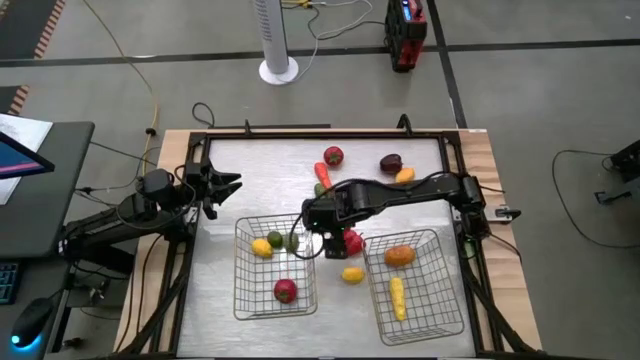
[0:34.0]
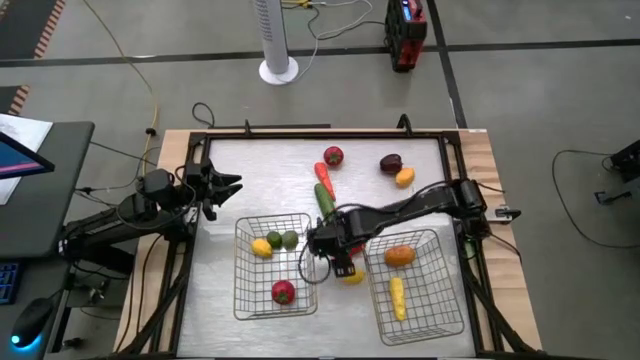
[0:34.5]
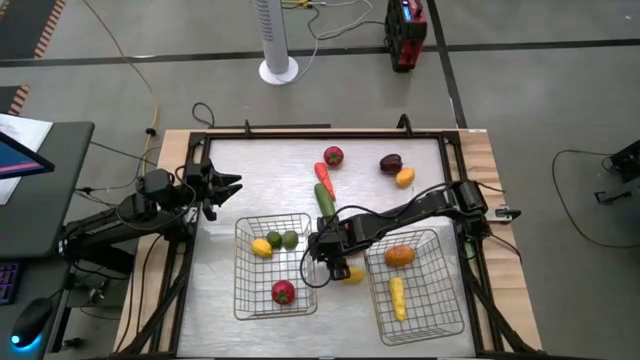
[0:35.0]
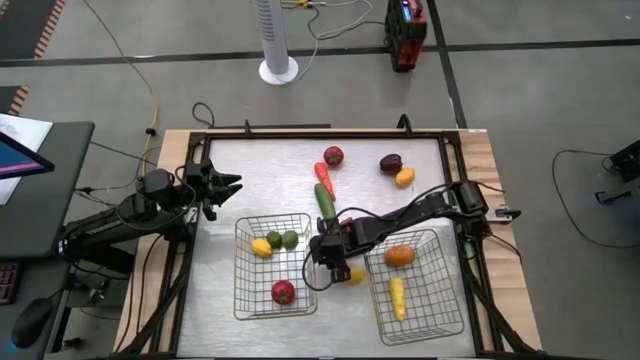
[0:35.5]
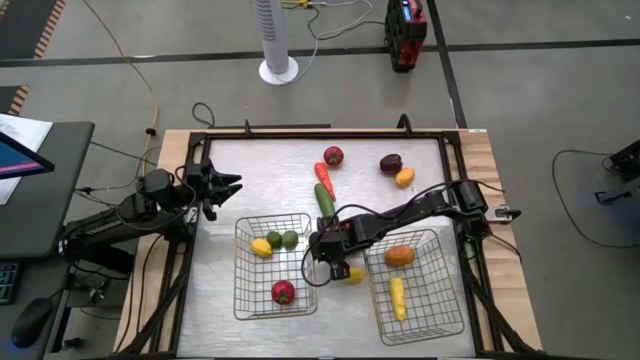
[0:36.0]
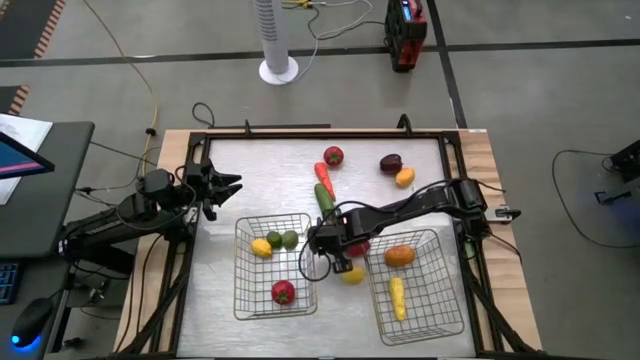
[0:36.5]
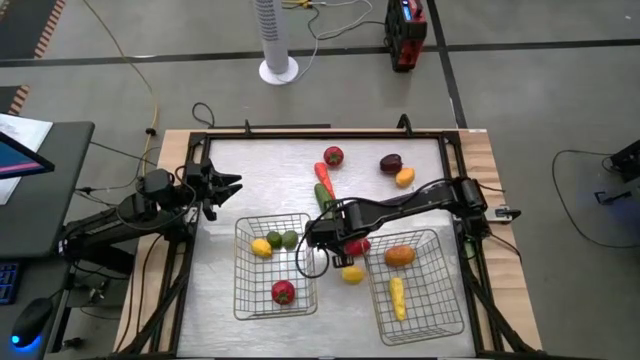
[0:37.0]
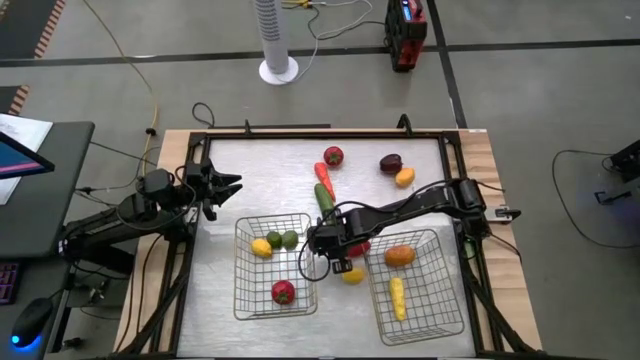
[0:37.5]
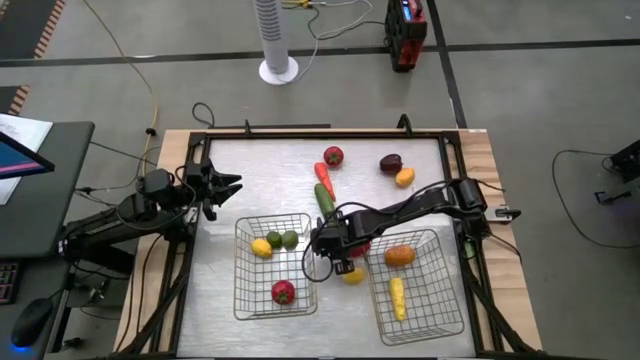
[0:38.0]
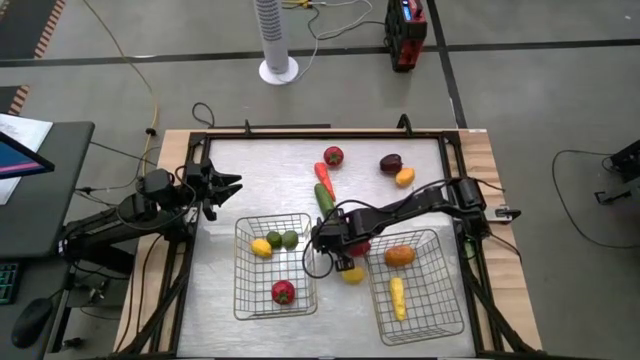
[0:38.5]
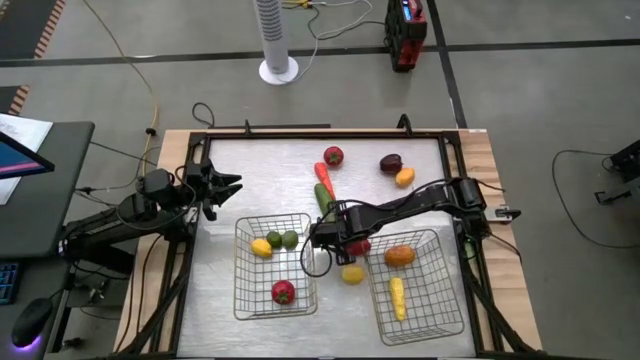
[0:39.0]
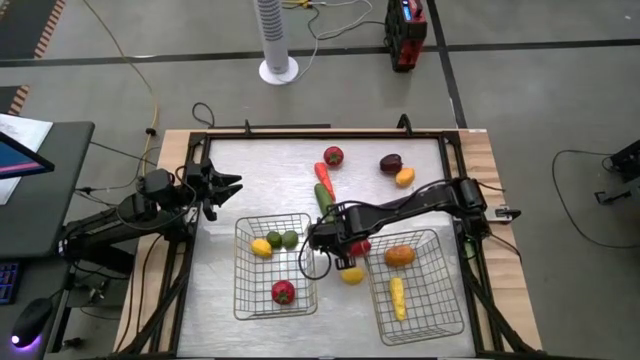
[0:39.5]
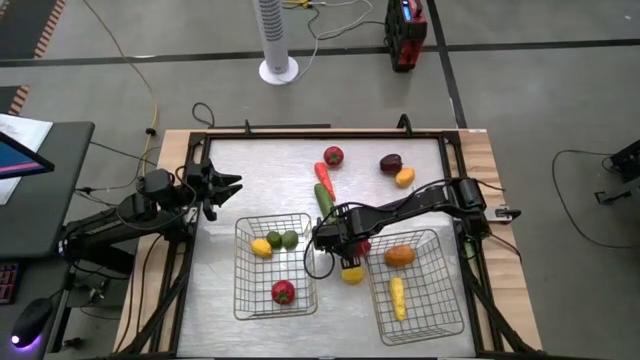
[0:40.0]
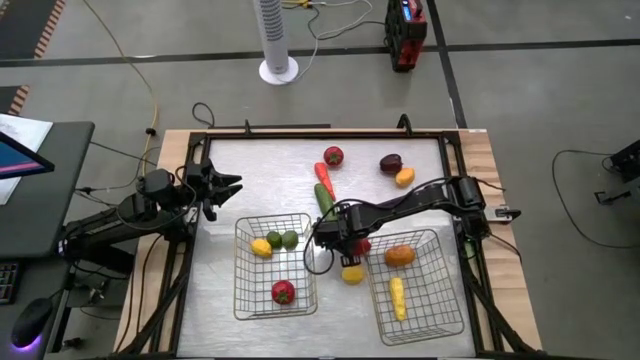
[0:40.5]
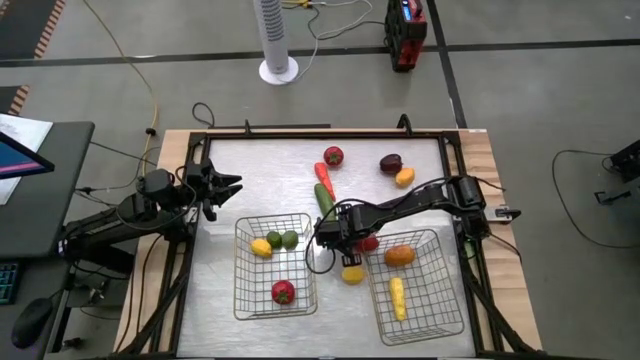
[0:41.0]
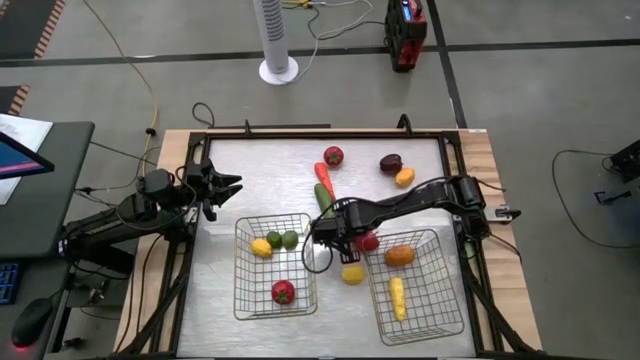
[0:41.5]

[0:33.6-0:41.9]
Task: Sort produce into baskets
Put the red chili pepper into the right wire basket

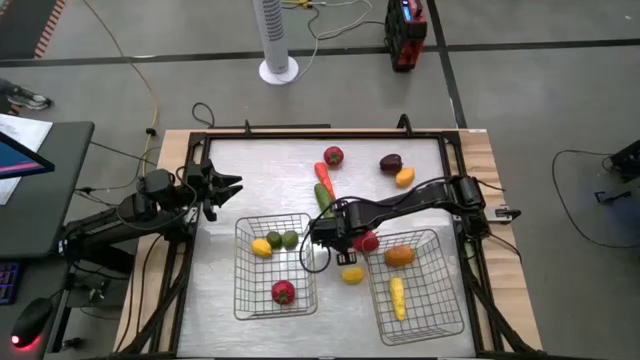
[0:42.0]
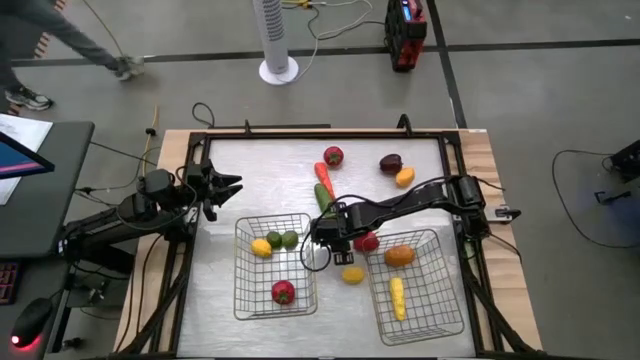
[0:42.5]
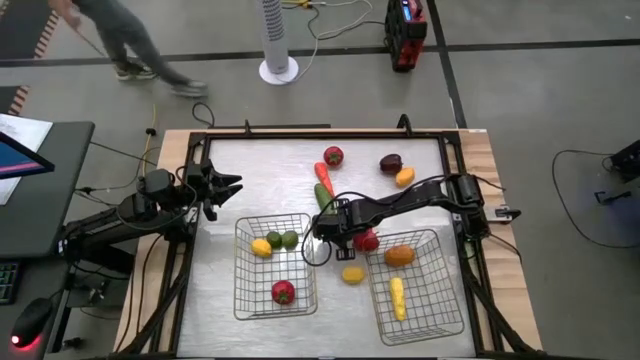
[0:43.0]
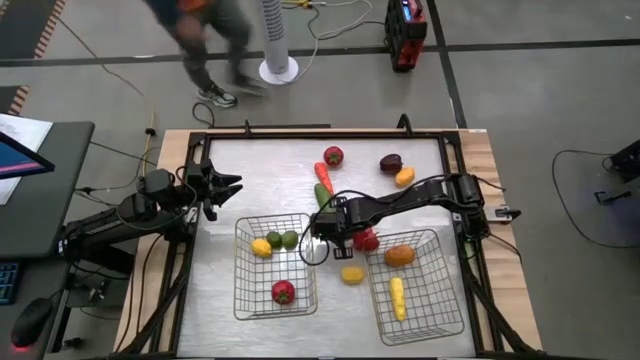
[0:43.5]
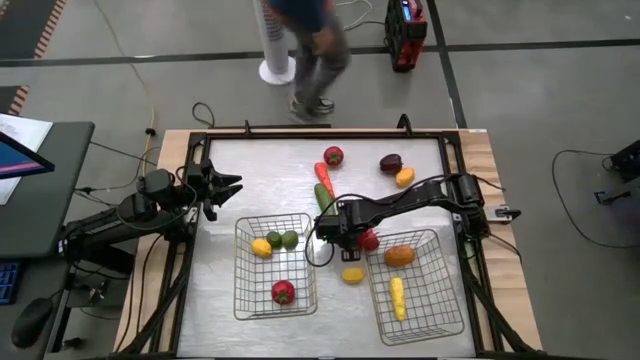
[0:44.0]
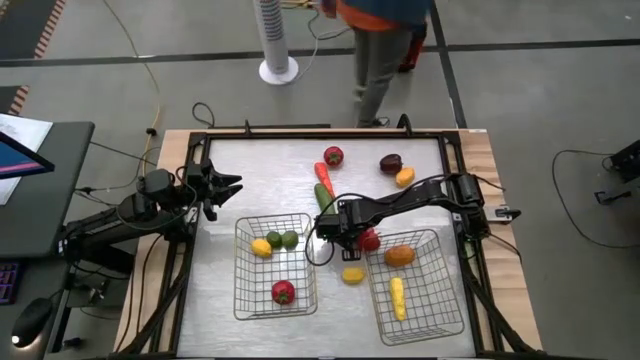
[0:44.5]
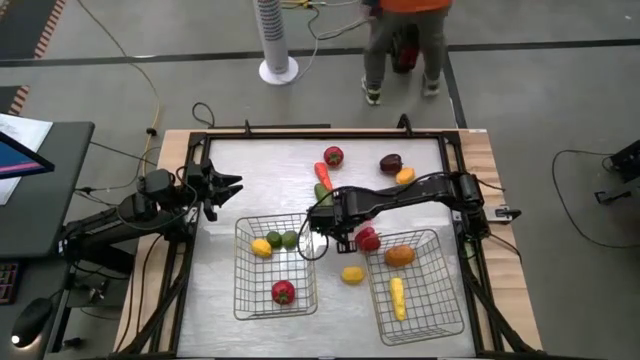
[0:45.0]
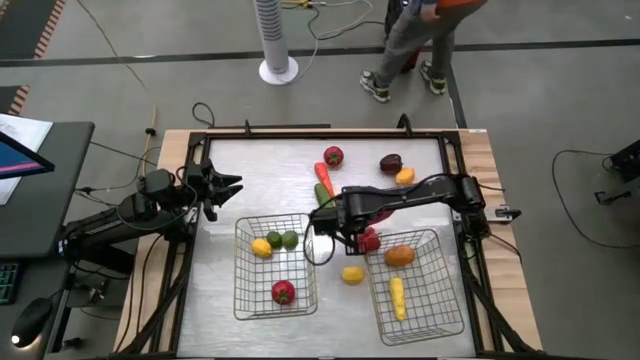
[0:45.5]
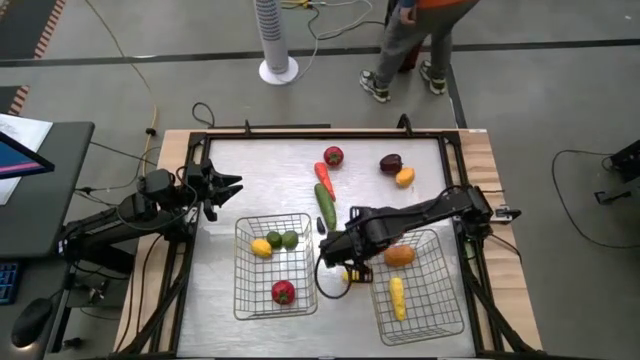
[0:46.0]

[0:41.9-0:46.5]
Put the red chili pepper into the right wire basket

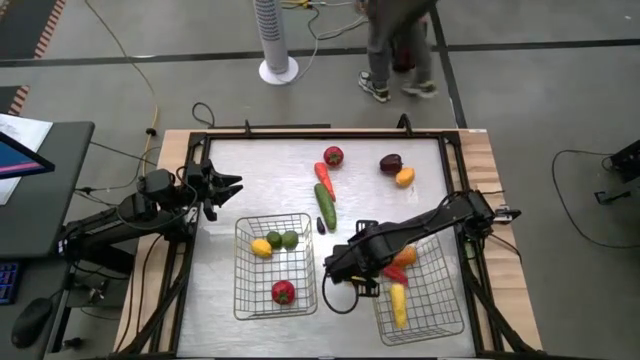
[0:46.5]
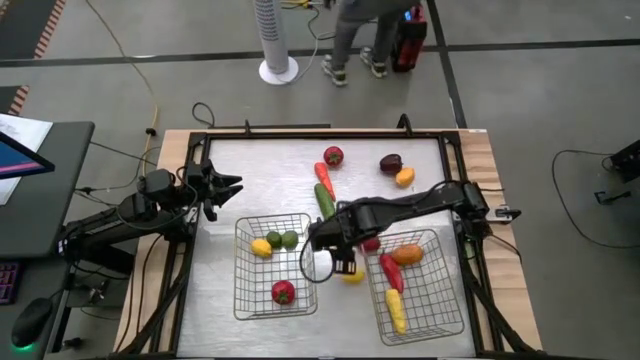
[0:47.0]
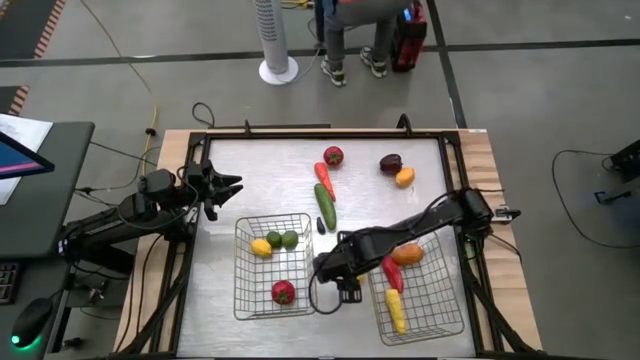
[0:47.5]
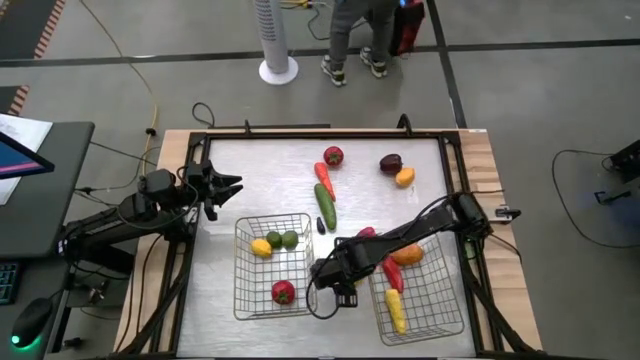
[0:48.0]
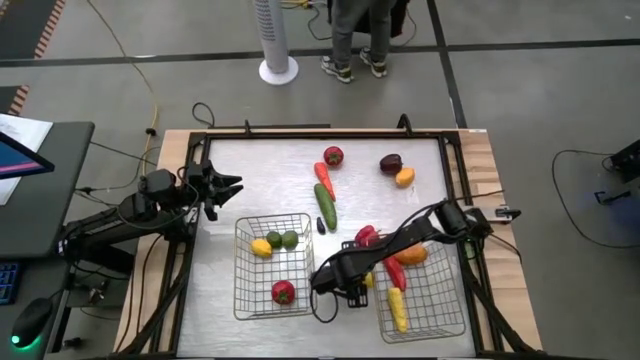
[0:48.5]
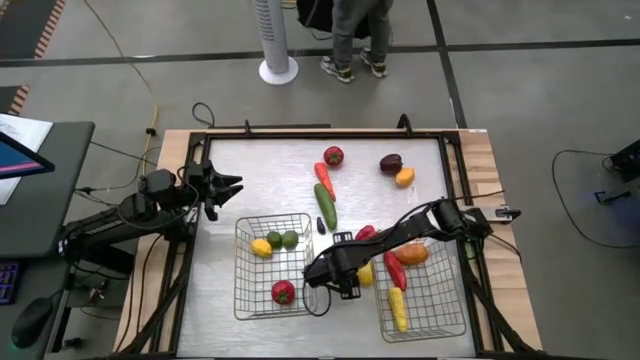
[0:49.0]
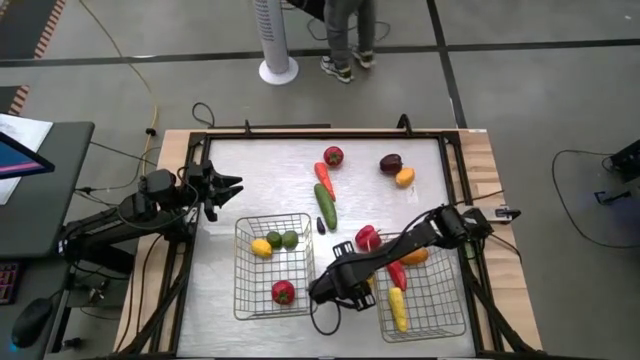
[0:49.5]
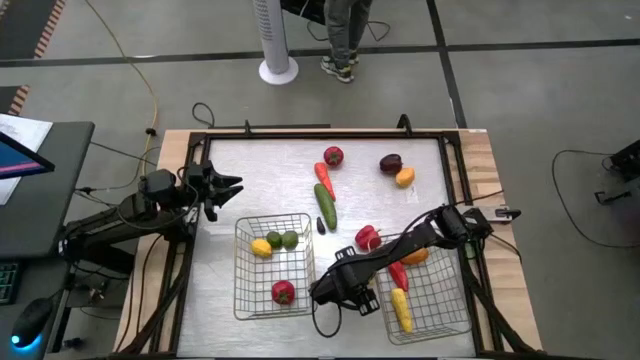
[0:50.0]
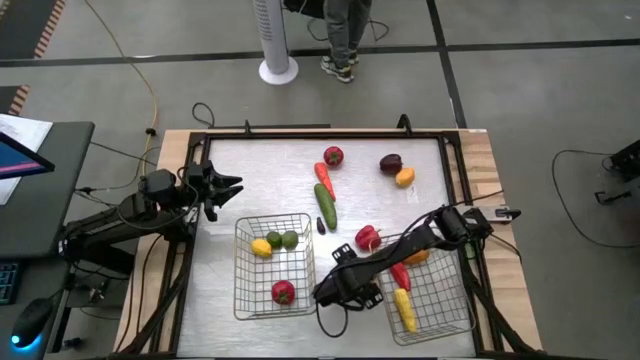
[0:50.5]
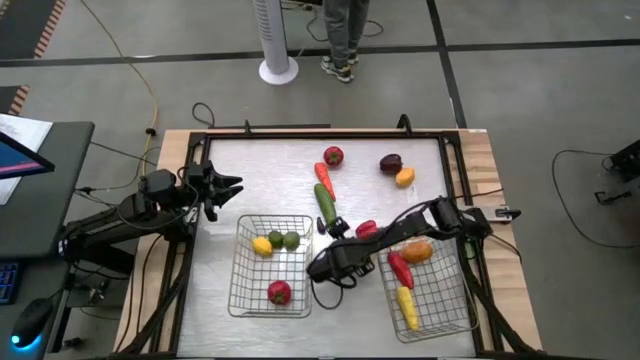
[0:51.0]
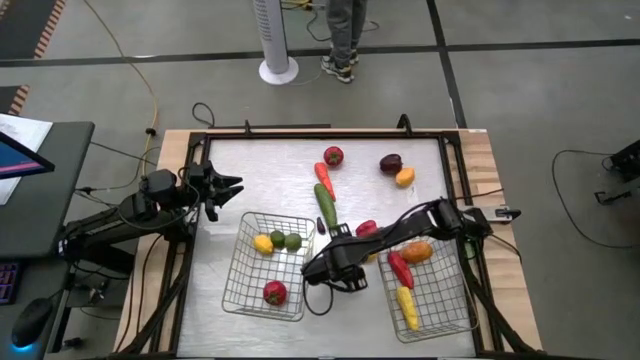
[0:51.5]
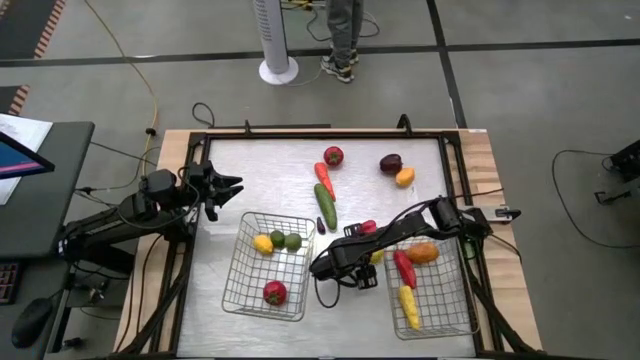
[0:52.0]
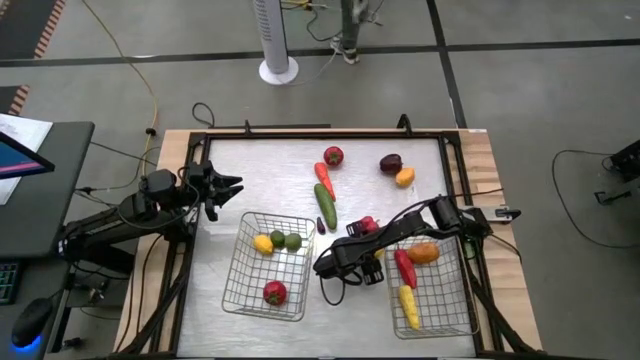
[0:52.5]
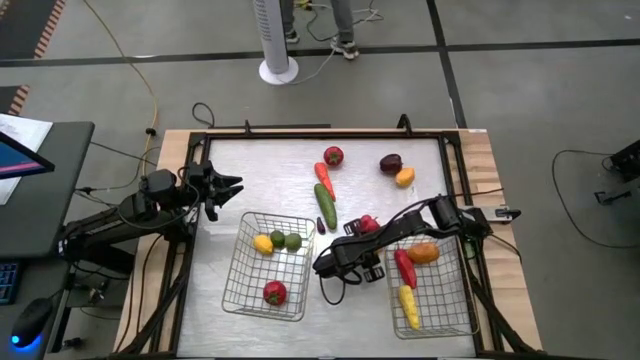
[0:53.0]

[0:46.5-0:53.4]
Put the yellow lemon into the left wire basket

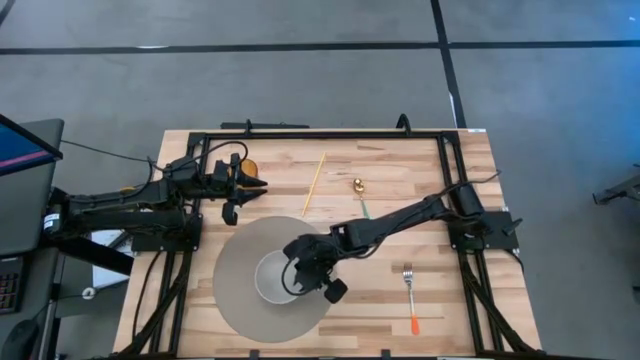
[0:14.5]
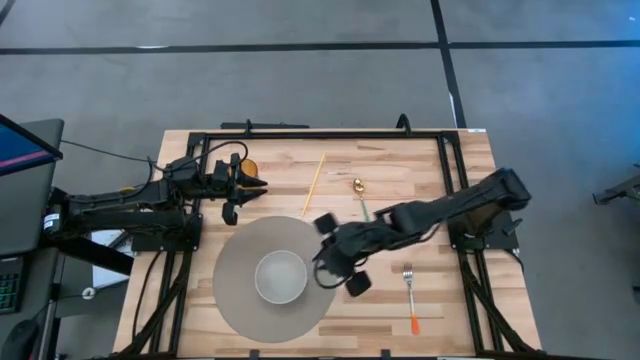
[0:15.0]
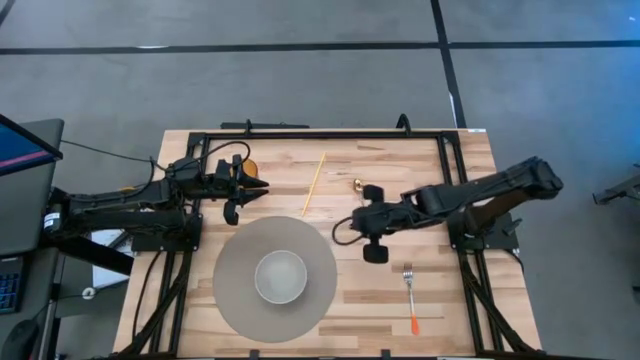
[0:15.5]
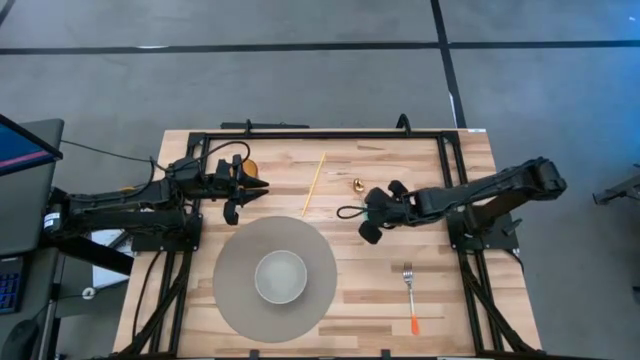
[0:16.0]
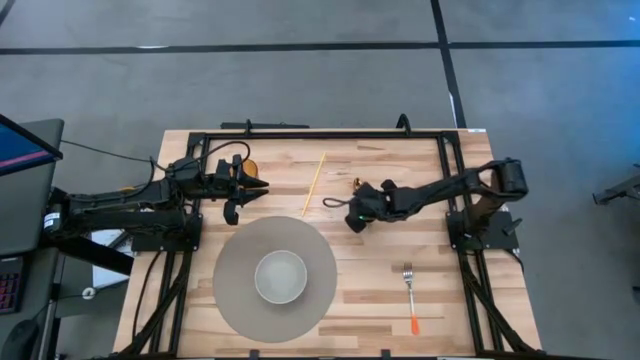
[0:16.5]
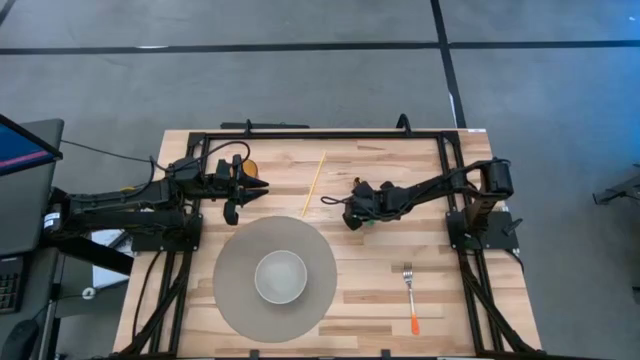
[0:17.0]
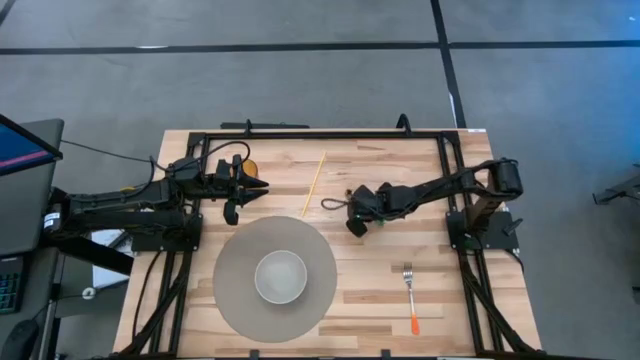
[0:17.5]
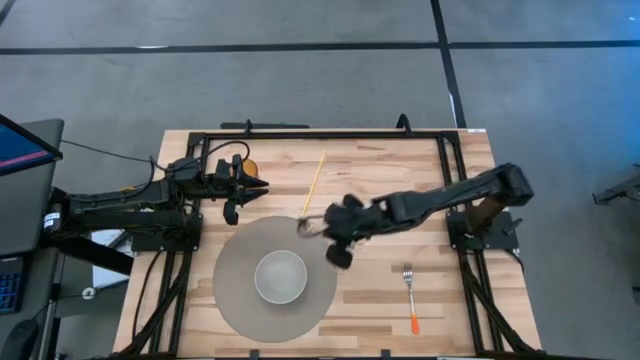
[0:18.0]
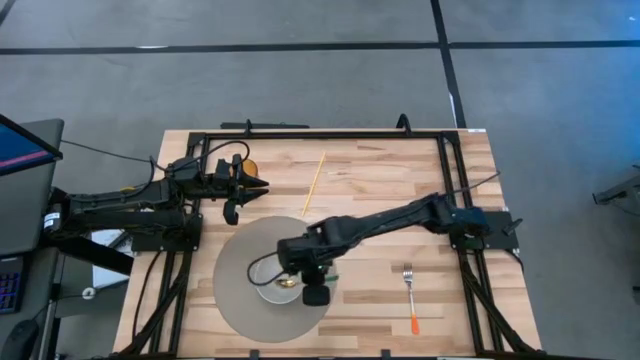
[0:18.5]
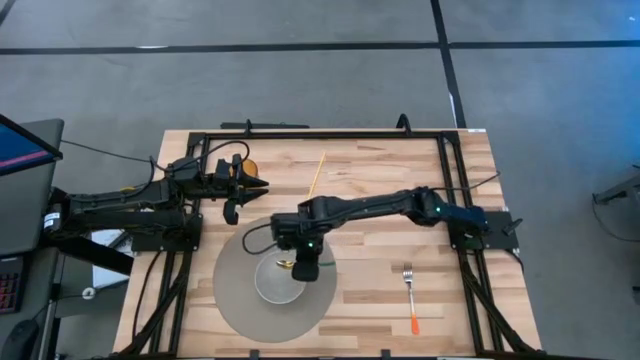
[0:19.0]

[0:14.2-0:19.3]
Task: Pick & Place Utensil
Put the green spoon into the gray bowl on the gray mat
